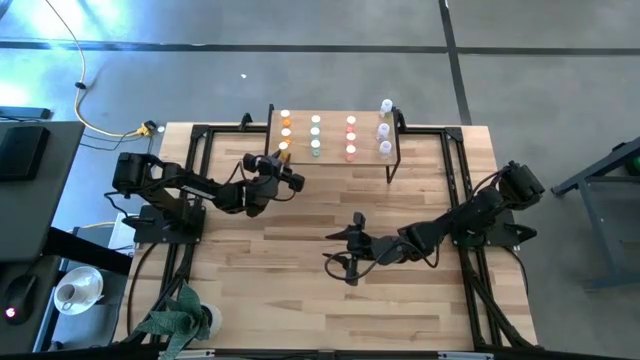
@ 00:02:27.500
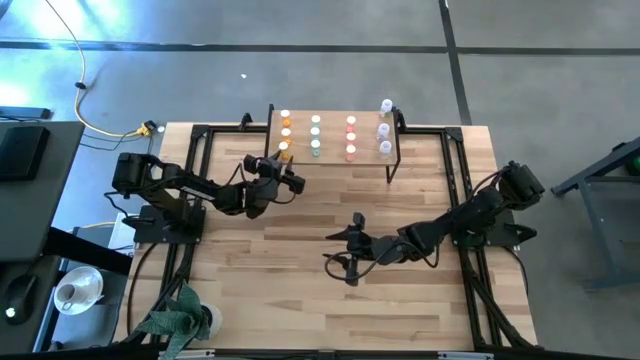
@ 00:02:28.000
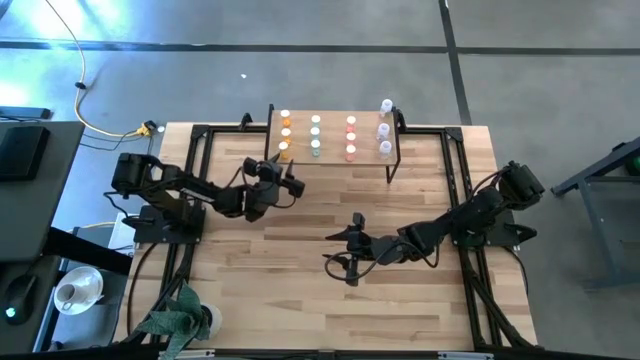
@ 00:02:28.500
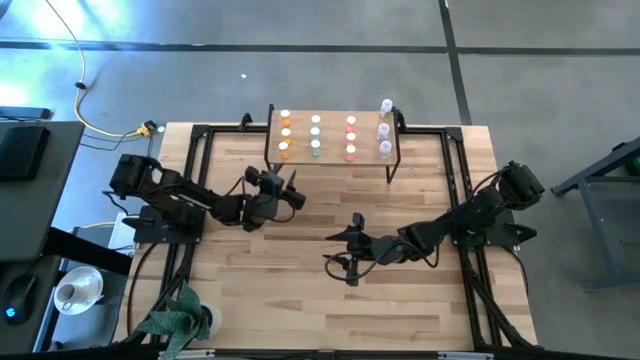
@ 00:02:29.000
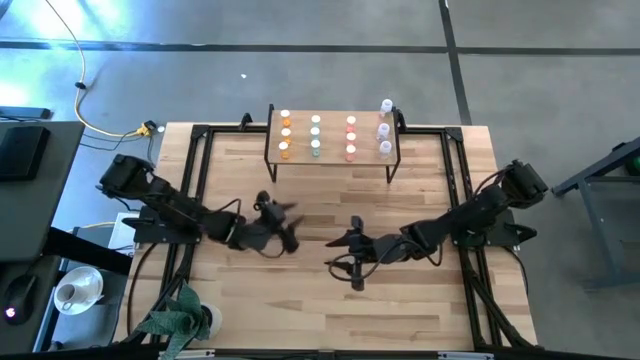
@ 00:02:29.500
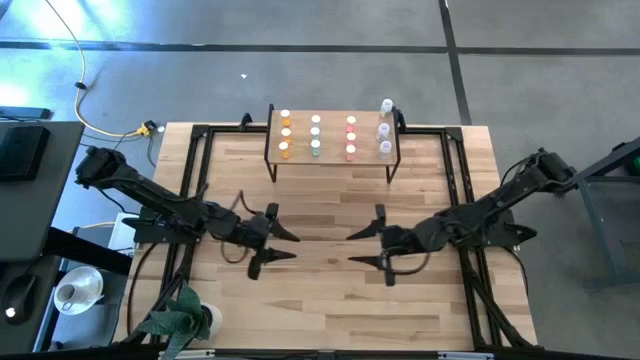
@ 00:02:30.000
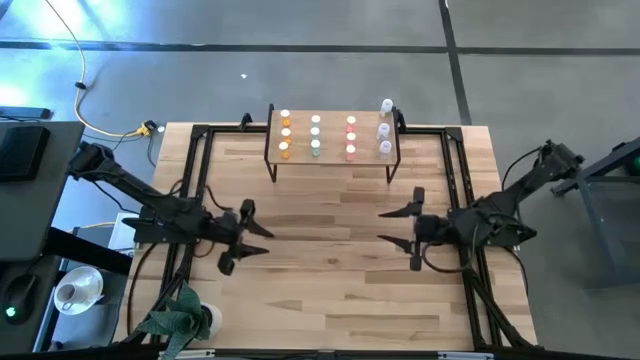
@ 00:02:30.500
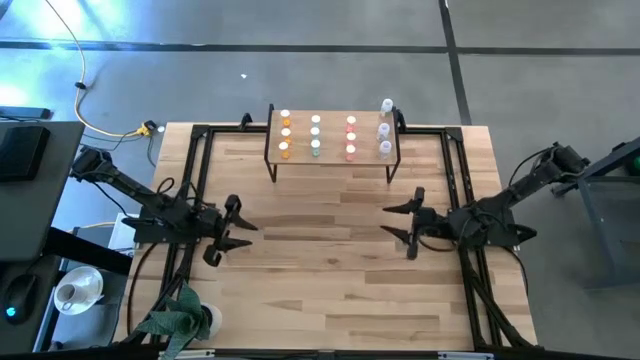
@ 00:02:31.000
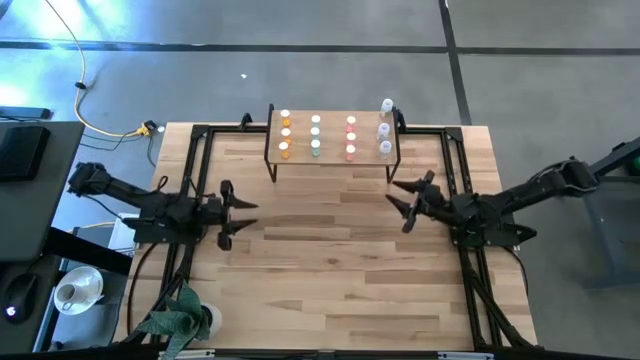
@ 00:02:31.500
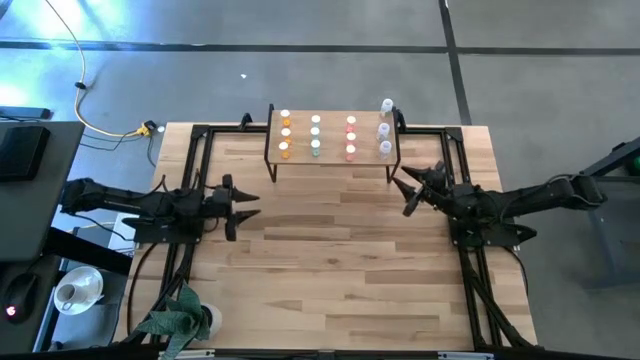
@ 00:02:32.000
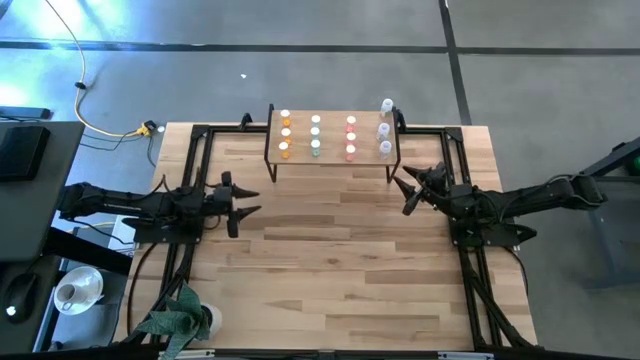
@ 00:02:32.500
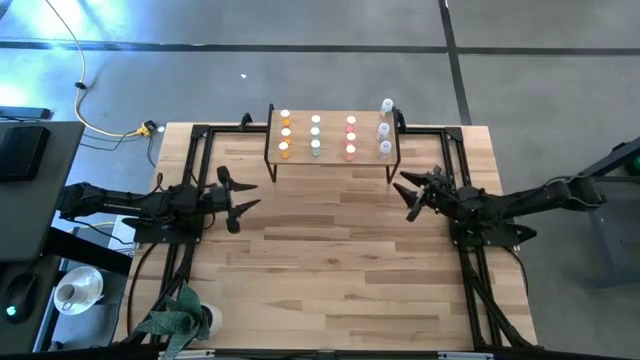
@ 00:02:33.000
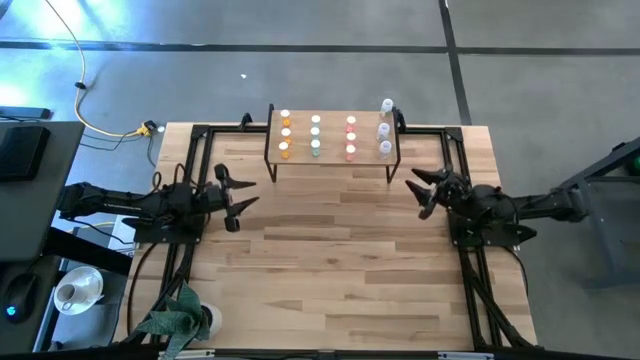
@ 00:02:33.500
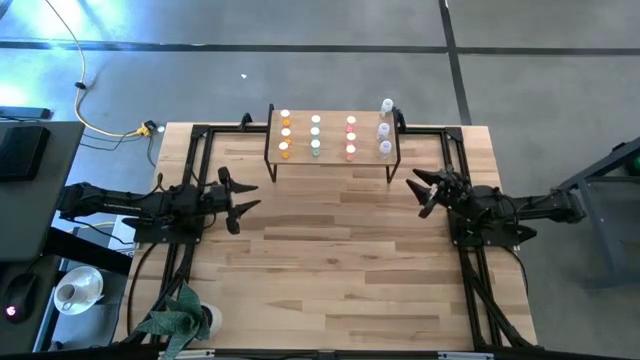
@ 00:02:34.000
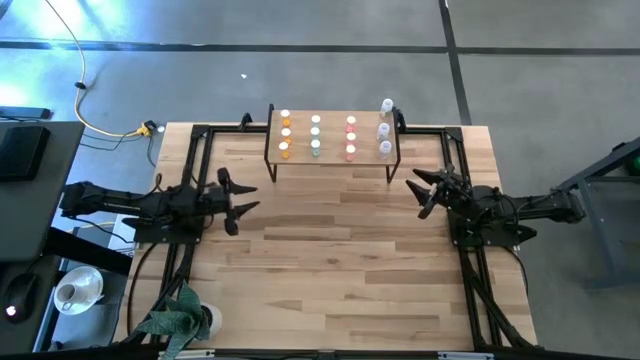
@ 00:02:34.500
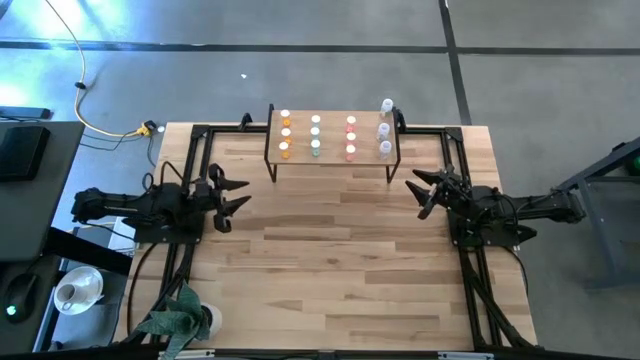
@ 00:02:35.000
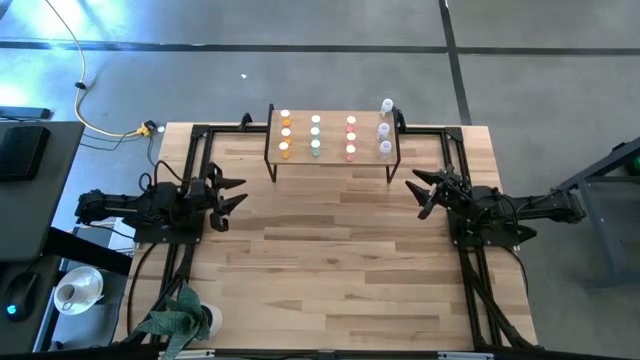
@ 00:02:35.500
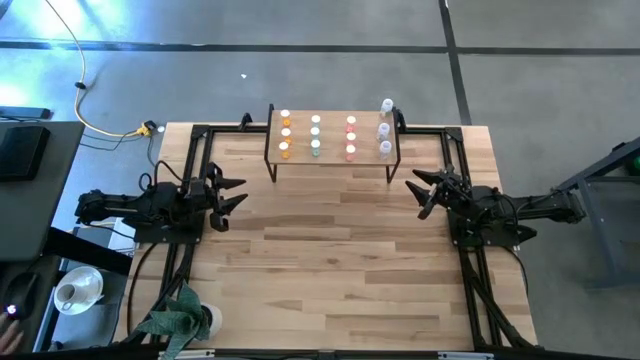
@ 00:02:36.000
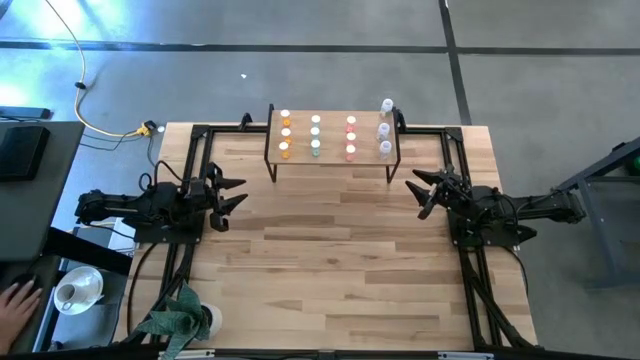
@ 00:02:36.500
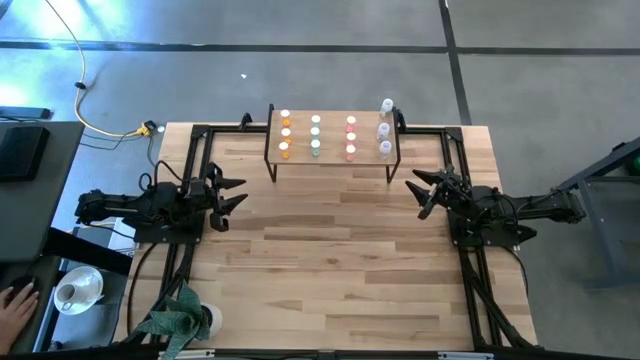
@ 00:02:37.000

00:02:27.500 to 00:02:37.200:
Task: Pick and place medicine bottles onto shelf by color
Return to Home Position

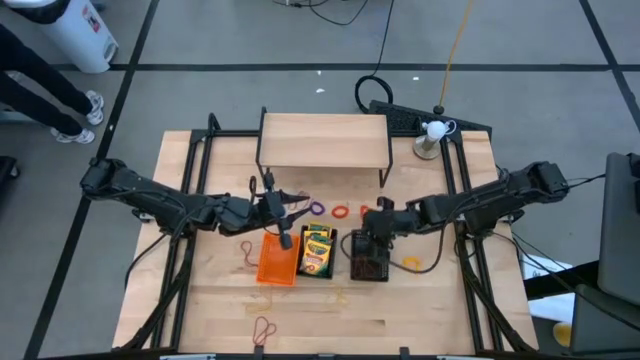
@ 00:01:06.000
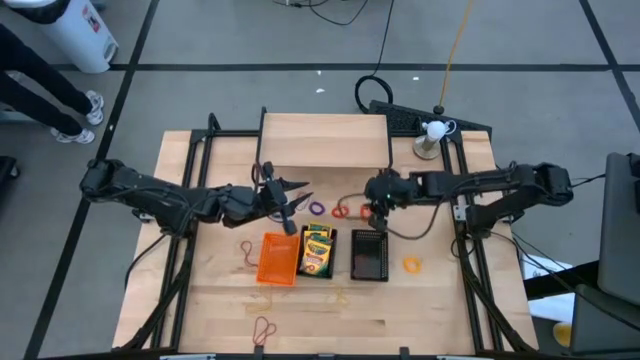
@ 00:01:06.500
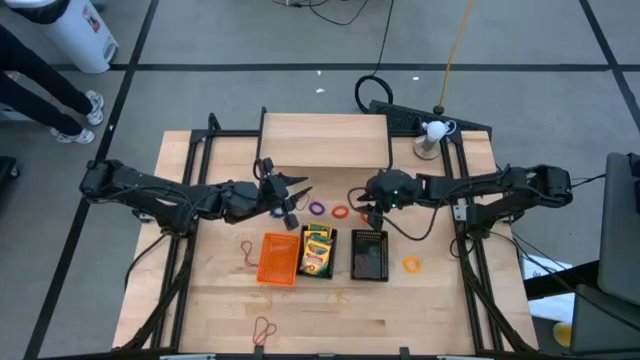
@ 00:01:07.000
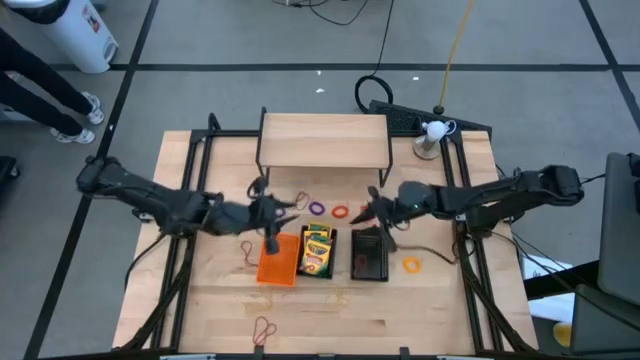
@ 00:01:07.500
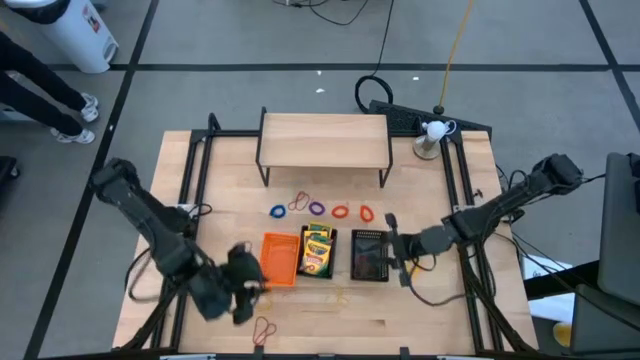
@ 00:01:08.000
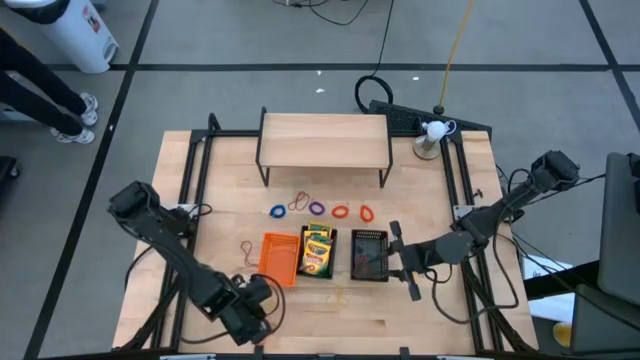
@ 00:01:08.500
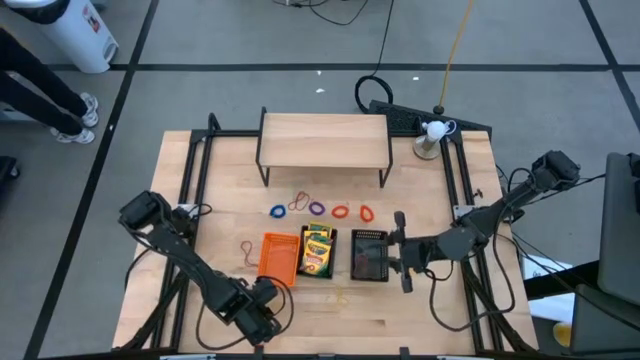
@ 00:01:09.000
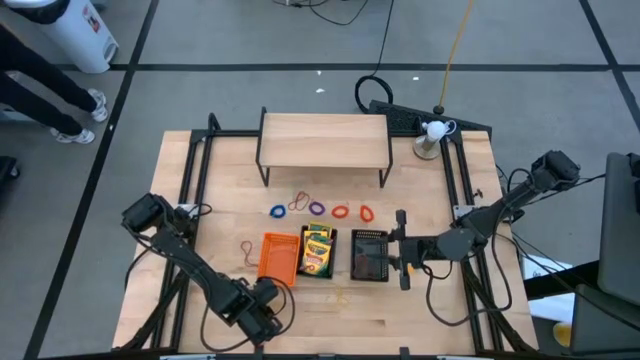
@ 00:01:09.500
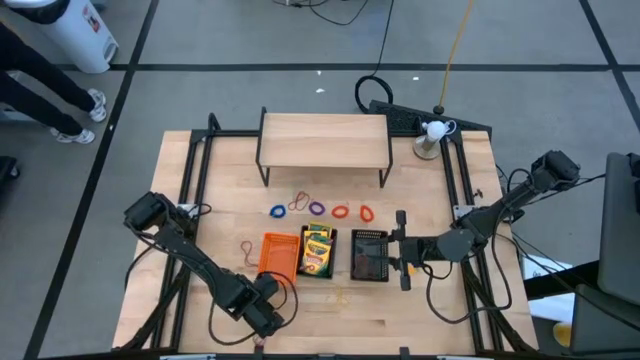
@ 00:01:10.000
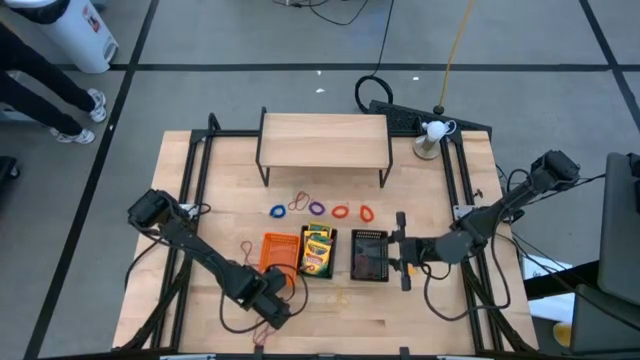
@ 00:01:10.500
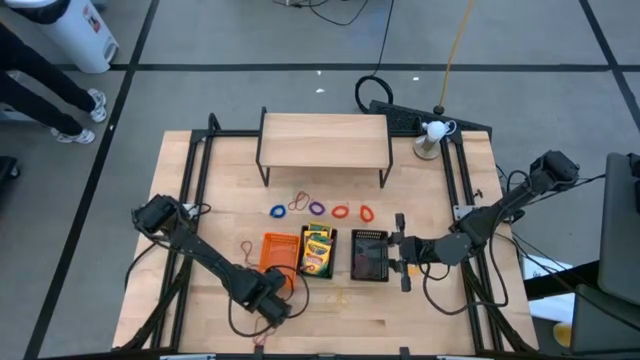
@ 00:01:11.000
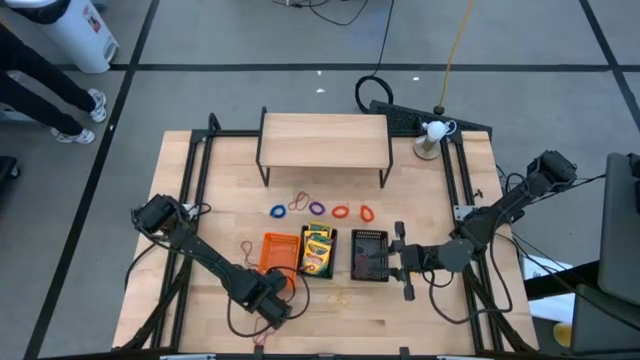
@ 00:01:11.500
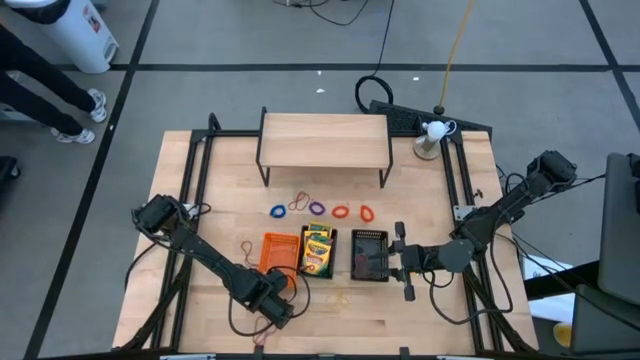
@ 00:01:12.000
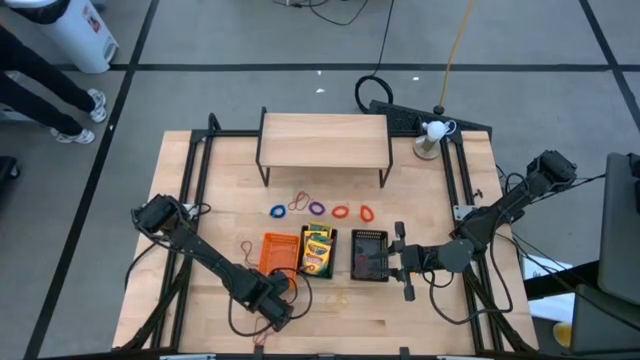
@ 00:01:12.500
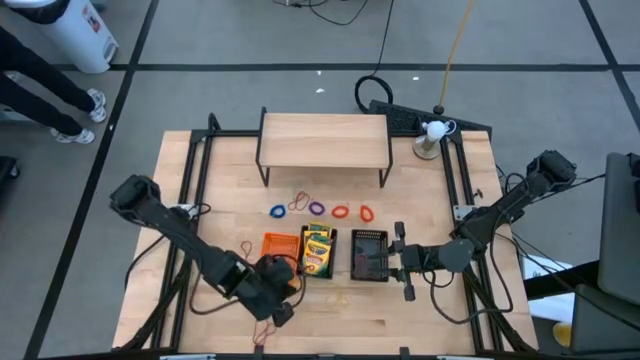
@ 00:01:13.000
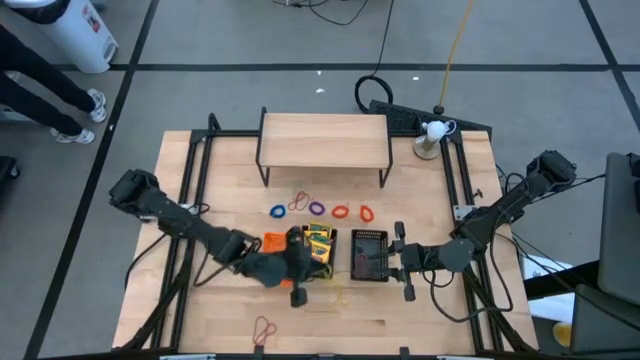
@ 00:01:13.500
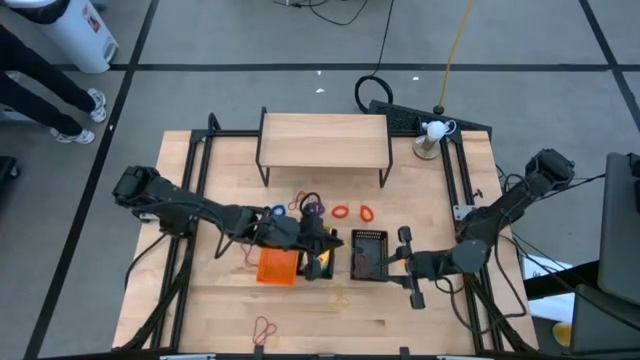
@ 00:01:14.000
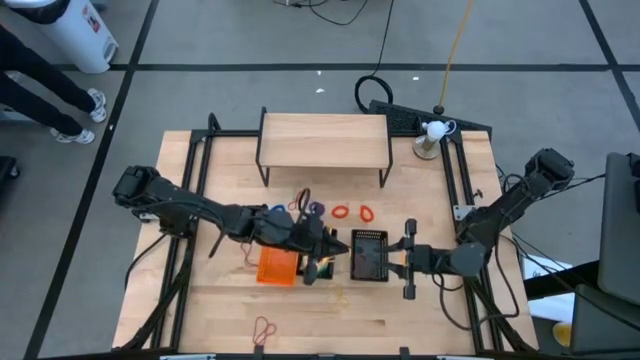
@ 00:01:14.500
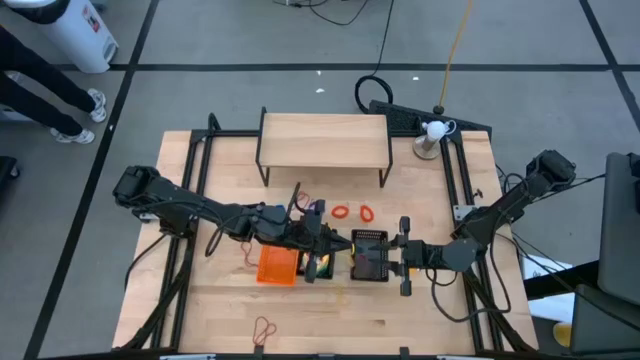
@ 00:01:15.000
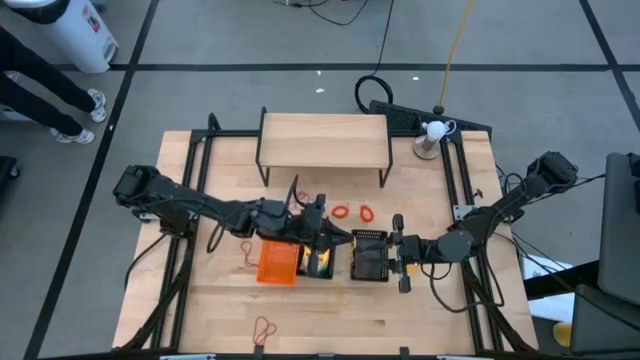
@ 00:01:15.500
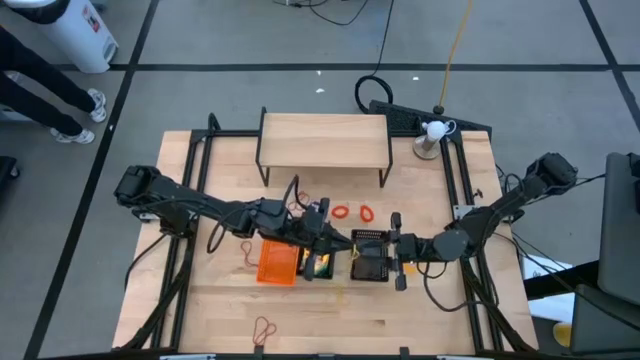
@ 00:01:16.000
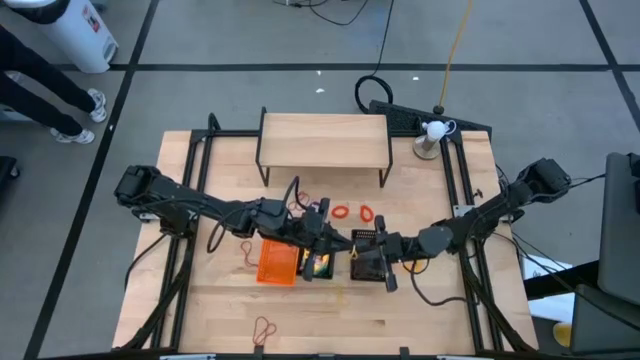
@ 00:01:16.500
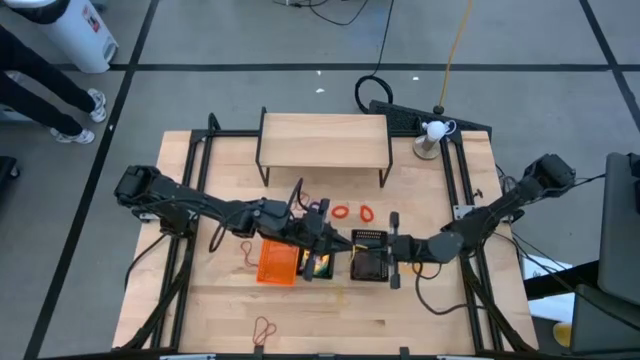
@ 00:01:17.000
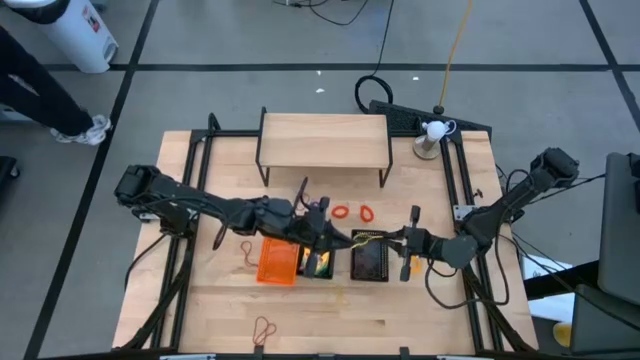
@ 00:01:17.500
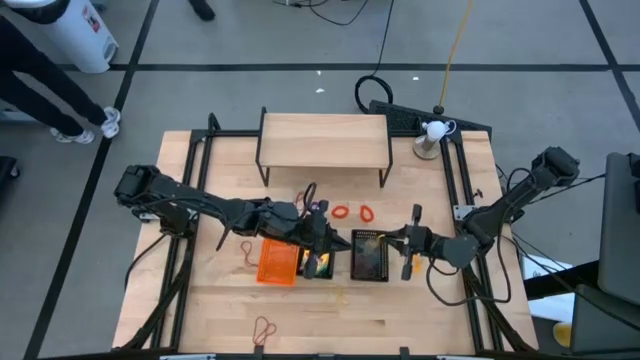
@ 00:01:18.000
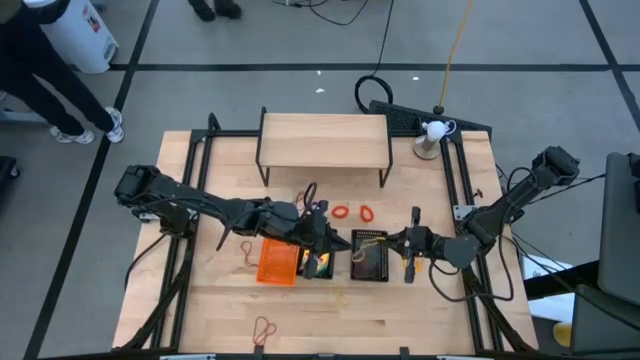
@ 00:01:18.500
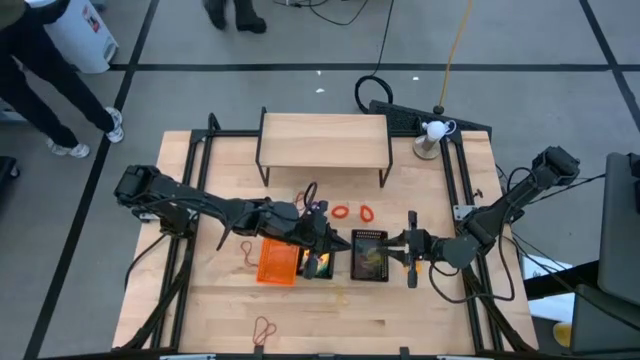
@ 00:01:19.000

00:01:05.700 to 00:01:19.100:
Task: Pick & Place Office Desk Supplies
Put the yellow rubber band into the right black bin
